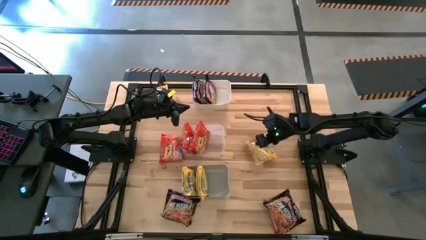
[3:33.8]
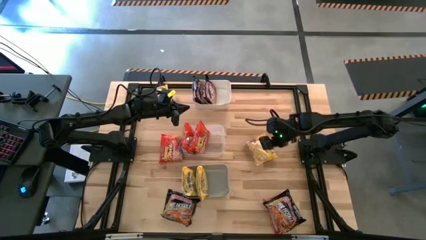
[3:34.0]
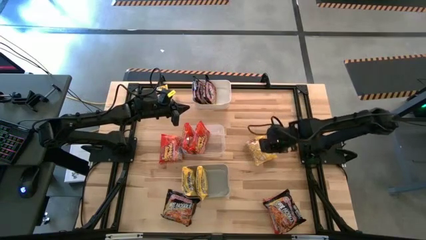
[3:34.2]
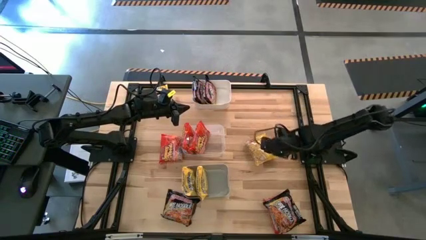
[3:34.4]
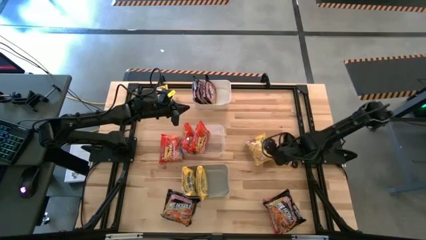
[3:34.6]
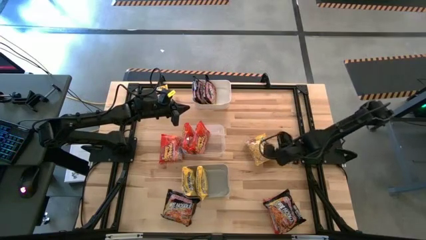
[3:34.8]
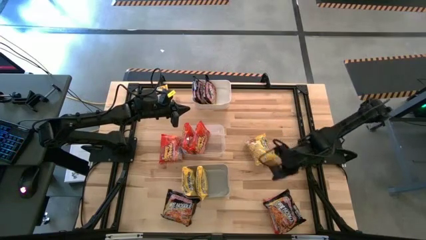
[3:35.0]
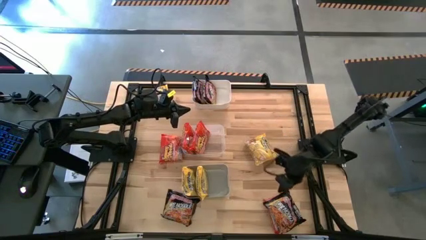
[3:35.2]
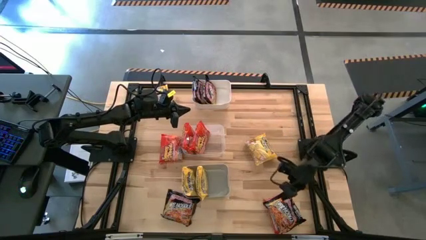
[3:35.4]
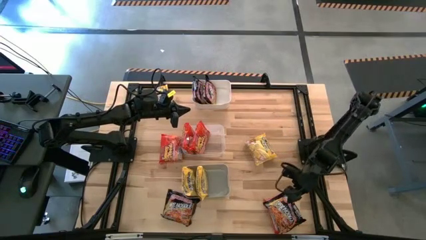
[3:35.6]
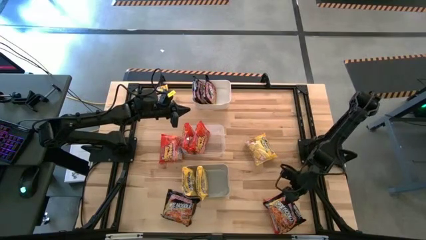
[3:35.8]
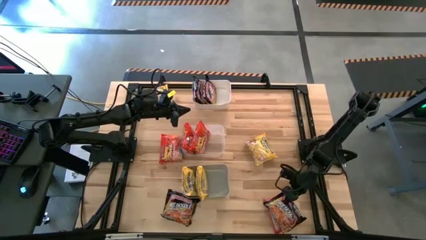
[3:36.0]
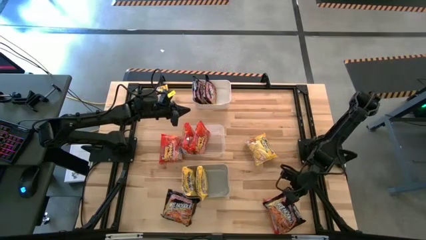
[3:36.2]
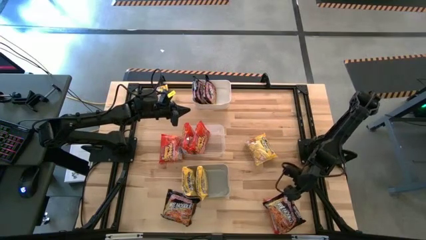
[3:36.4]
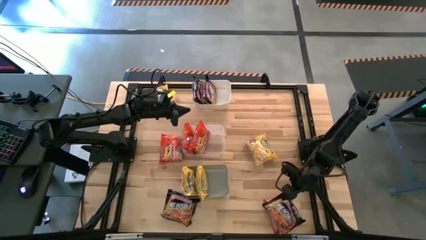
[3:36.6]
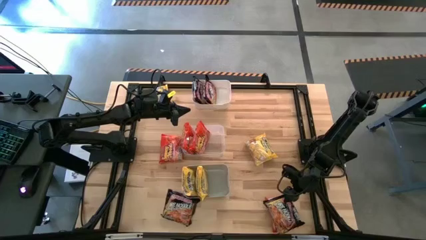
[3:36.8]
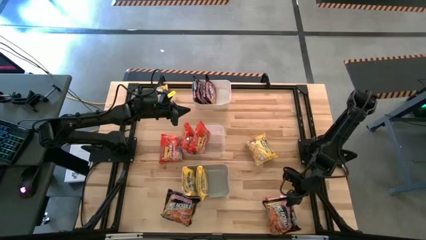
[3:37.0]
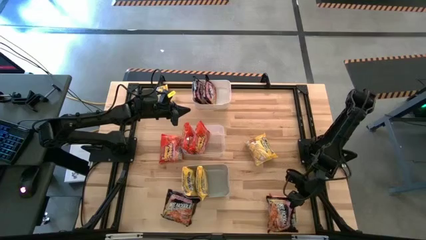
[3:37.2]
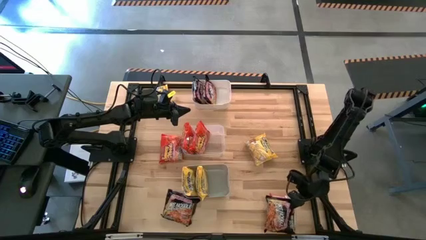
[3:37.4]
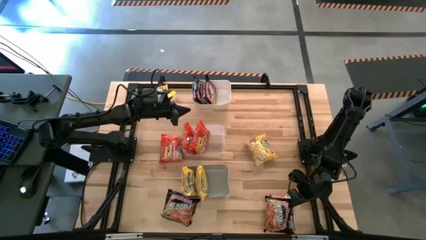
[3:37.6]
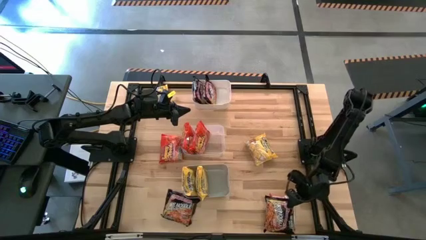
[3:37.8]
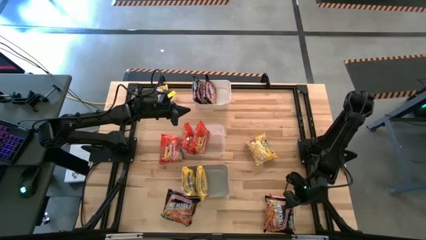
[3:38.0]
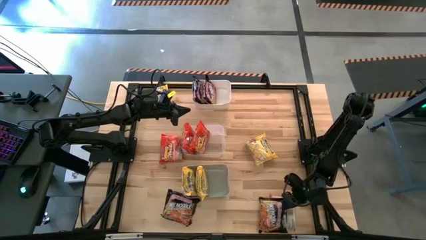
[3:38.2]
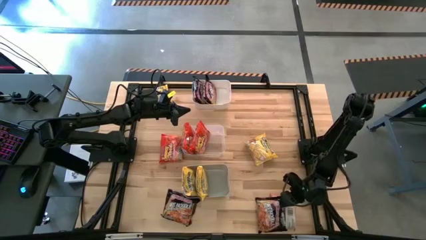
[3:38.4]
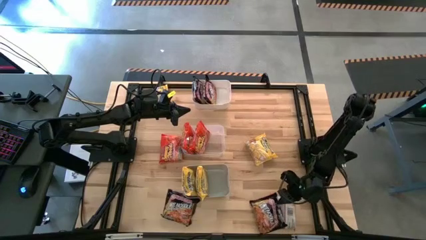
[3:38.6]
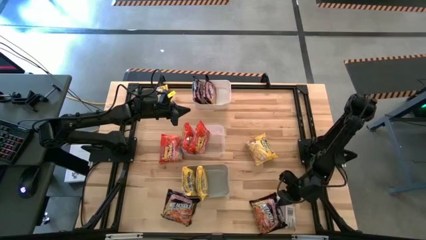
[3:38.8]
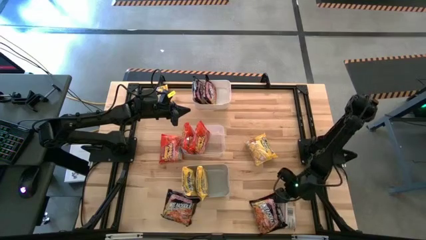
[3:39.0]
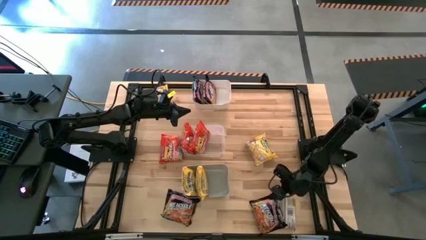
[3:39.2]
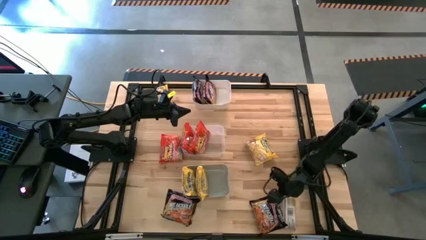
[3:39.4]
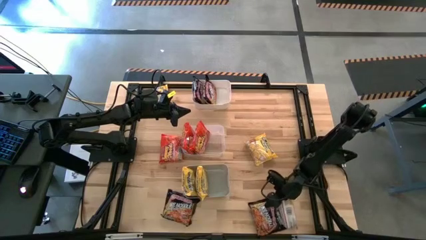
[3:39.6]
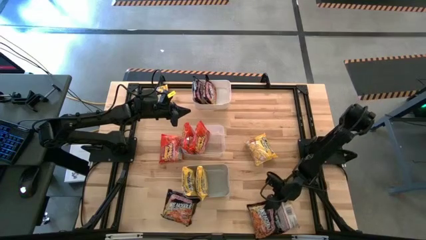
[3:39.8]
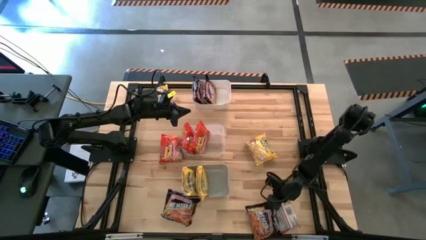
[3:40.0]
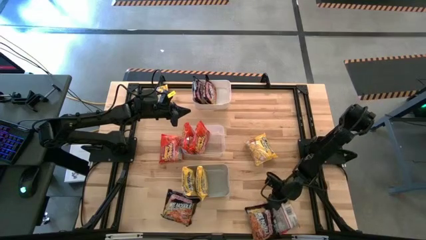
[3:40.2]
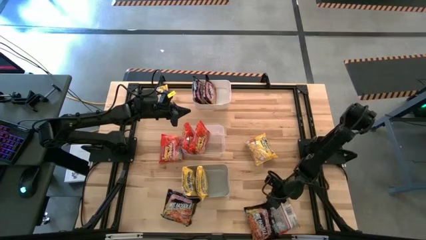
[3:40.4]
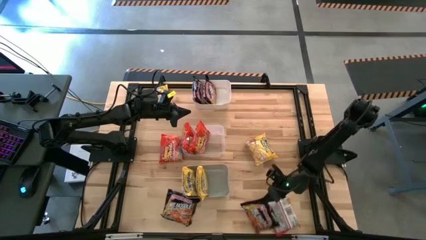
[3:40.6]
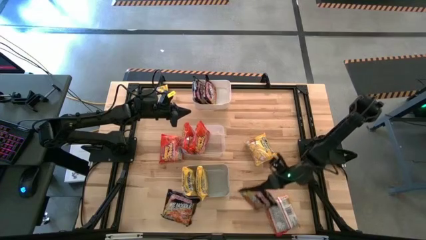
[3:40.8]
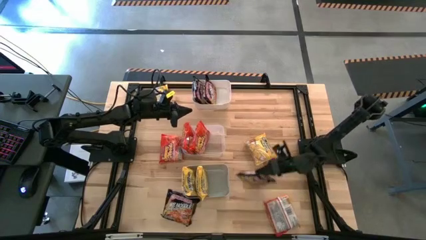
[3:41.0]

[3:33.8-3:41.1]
Task: Sort Maruchan noodles
Put the black noodle pack into the white bin

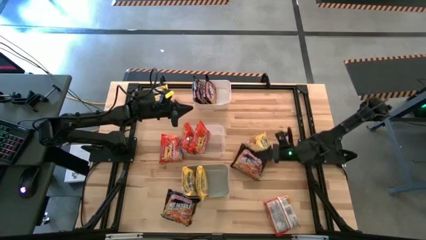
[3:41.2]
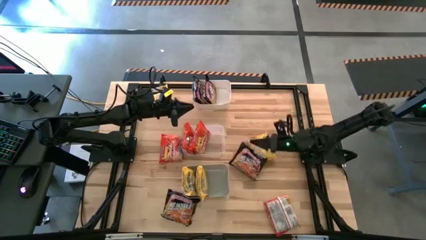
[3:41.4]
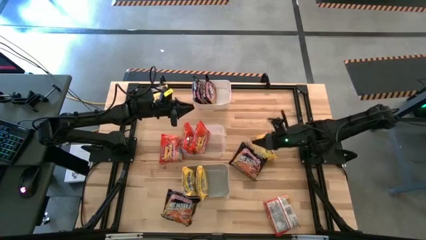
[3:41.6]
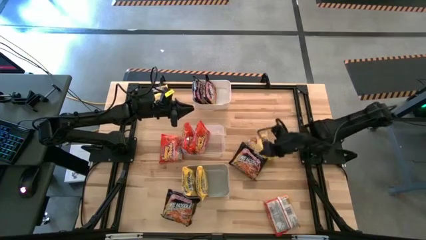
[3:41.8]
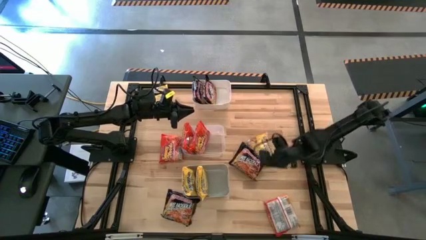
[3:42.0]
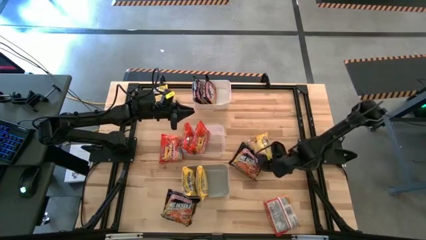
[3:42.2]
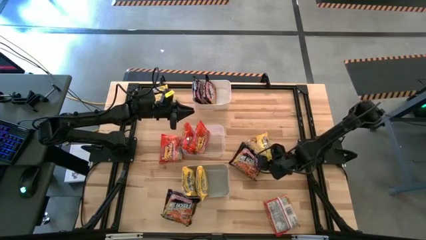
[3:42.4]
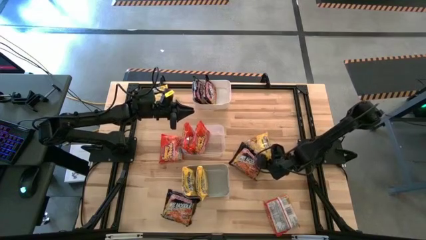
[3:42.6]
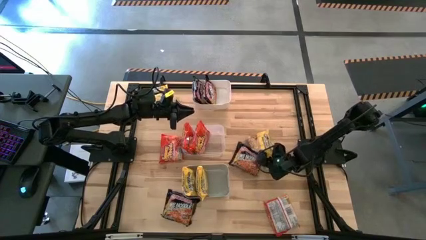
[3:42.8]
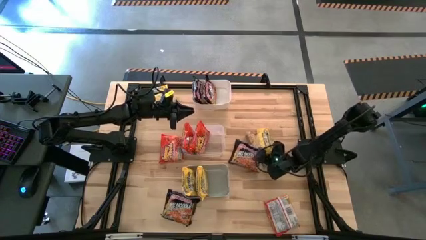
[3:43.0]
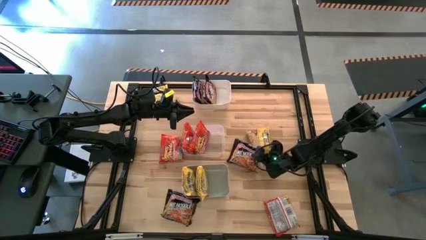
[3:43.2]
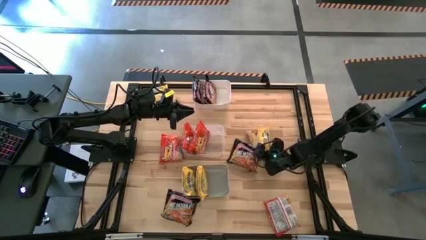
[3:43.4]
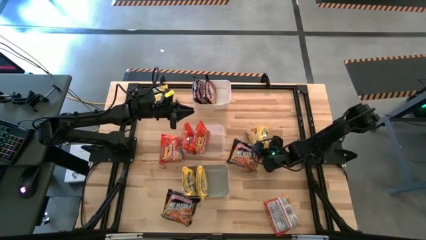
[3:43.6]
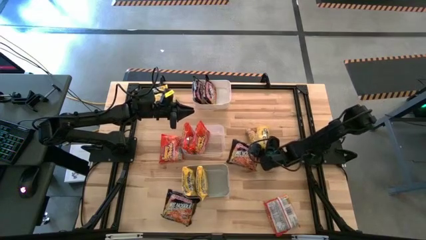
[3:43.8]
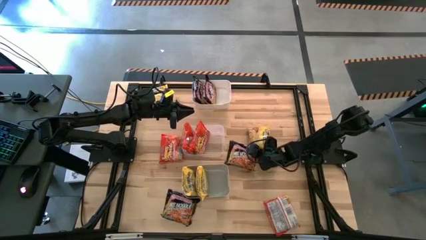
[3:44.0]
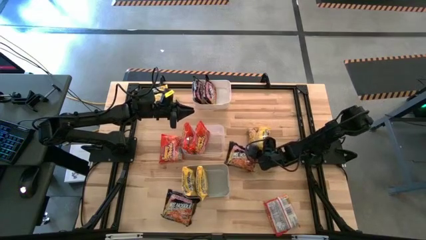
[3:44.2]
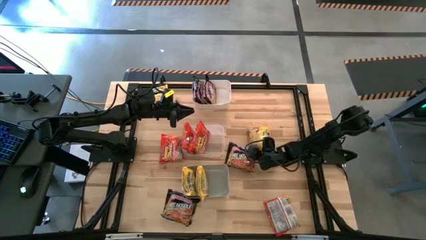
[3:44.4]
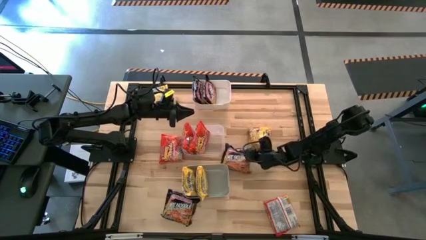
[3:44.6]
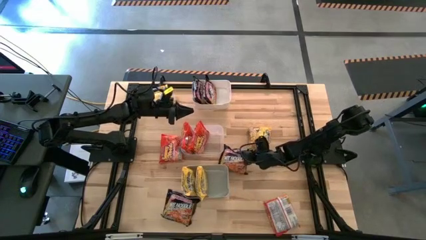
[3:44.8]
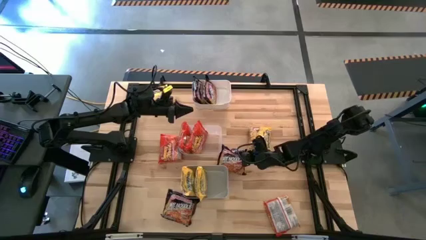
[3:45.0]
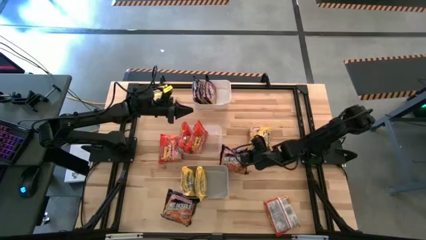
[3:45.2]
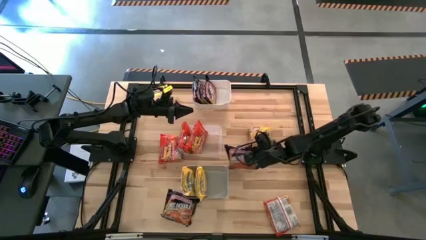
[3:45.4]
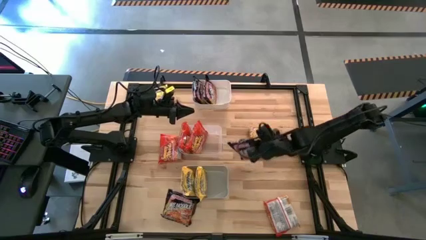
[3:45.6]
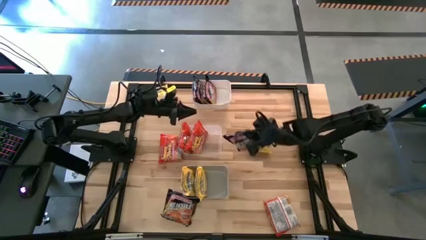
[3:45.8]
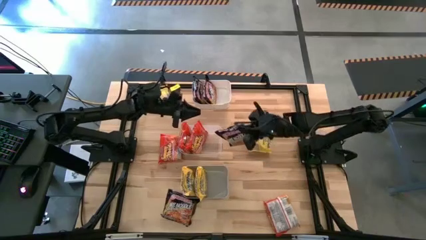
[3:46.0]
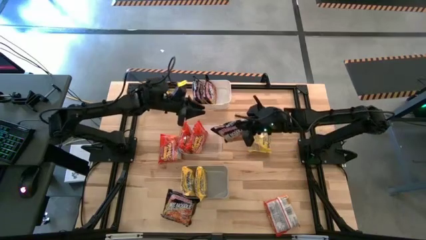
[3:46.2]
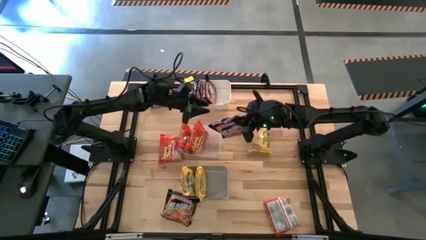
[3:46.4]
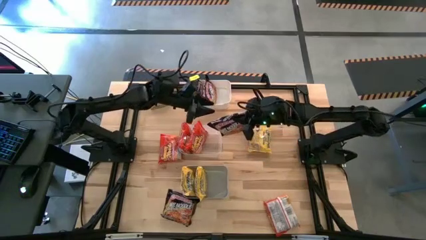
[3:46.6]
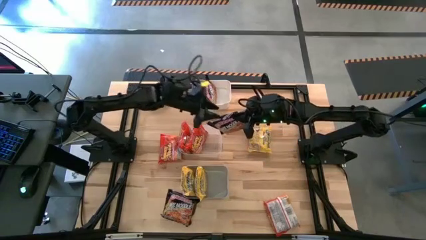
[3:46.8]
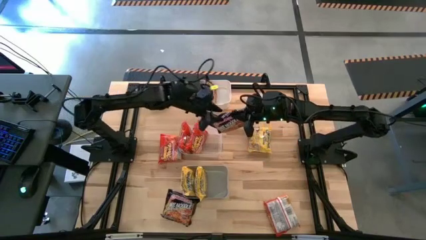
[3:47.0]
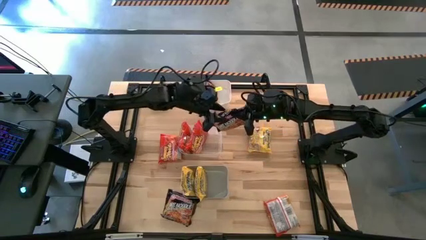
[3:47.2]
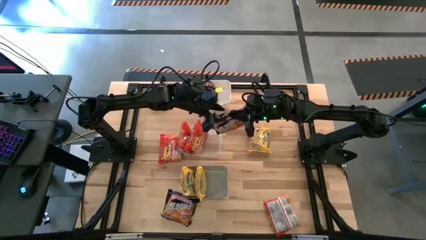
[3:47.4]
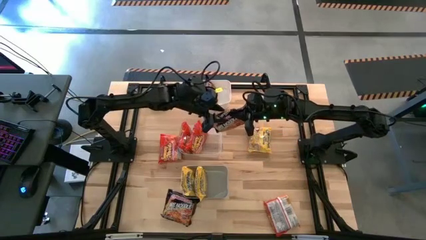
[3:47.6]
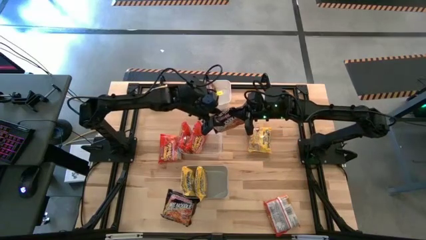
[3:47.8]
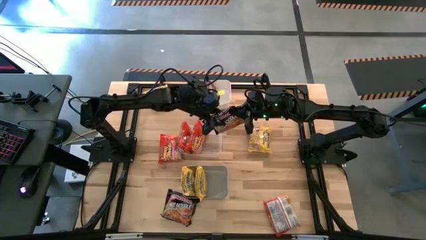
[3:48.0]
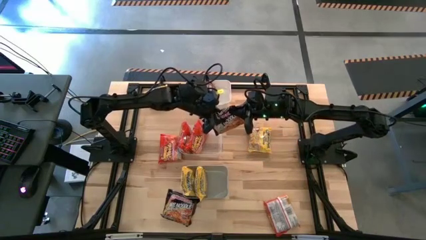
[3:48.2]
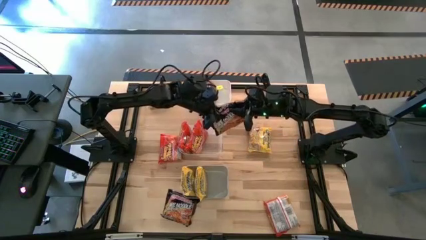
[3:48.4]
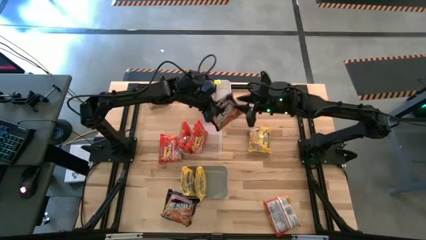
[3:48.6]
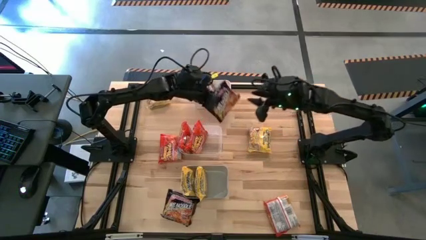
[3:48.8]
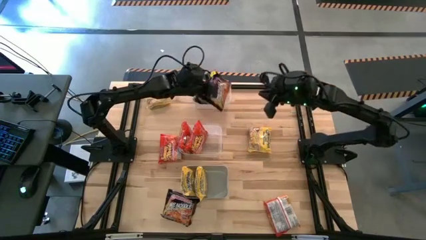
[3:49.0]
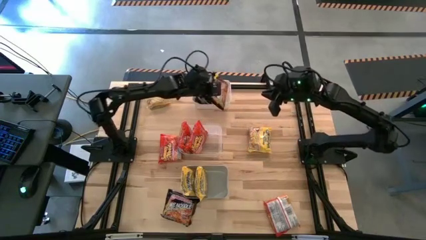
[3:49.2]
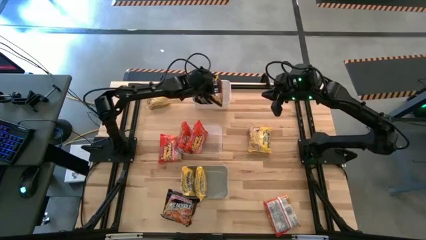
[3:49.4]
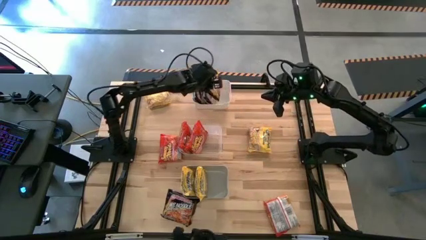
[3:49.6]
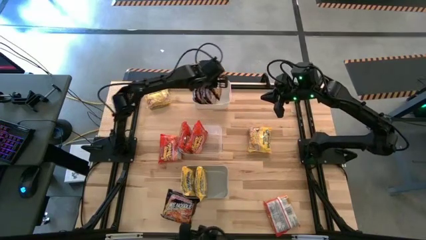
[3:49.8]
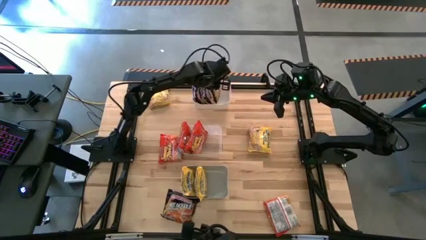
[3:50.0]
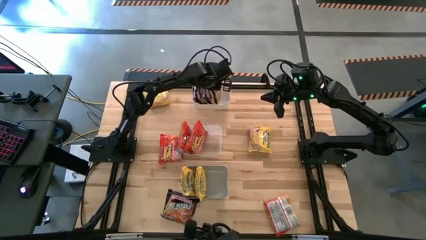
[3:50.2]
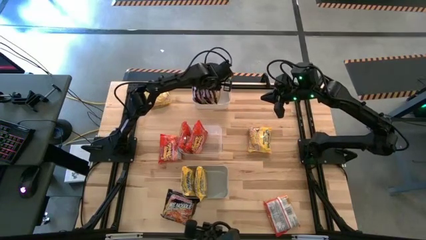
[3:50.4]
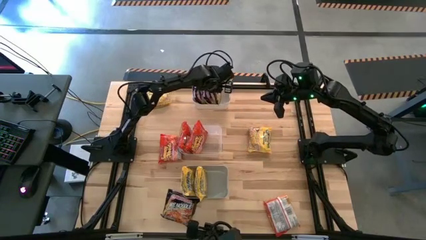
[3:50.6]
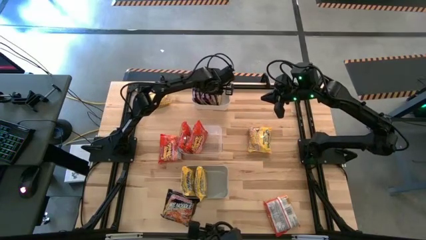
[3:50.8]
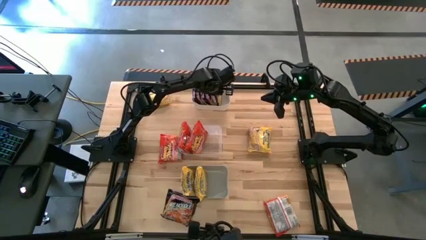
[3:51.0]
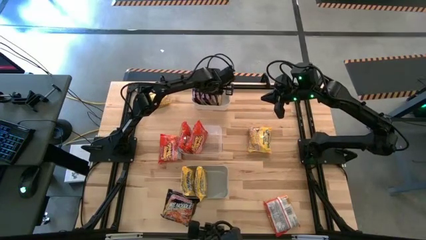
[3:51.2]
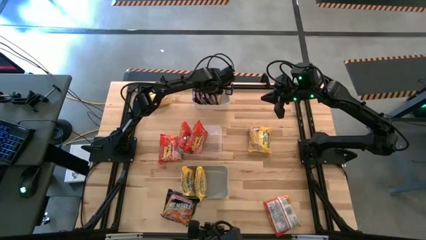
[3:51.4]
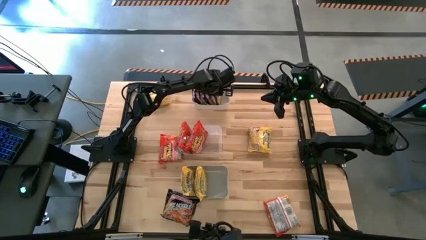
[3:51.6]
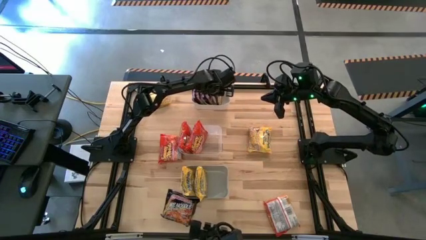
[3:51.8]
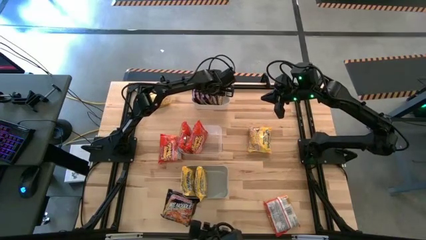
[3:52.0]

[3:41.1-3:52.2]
Put the black noodle pack into the white bin
